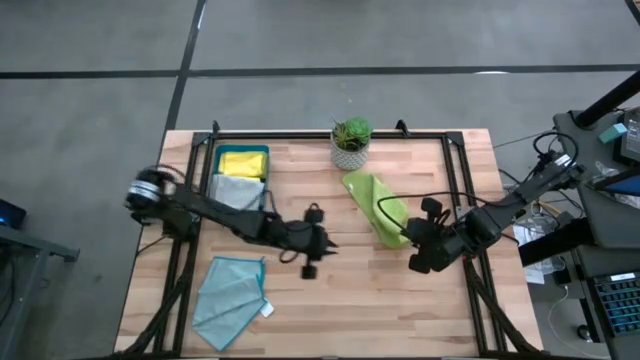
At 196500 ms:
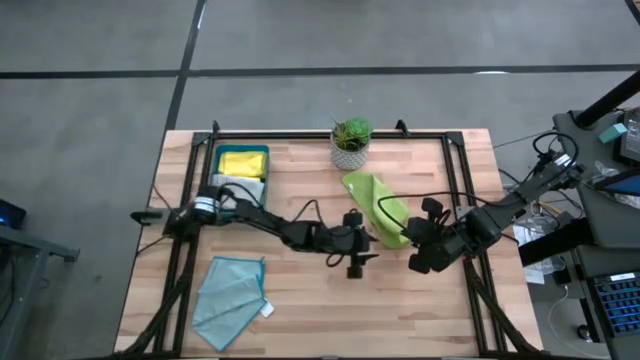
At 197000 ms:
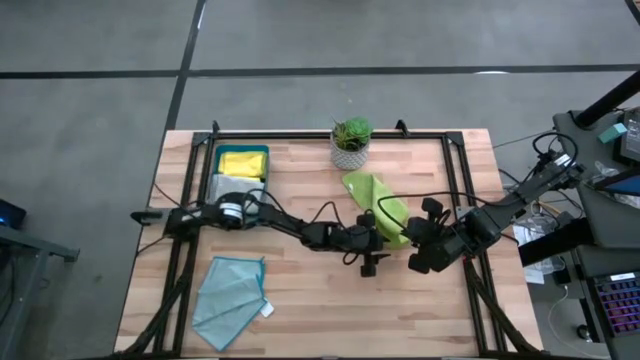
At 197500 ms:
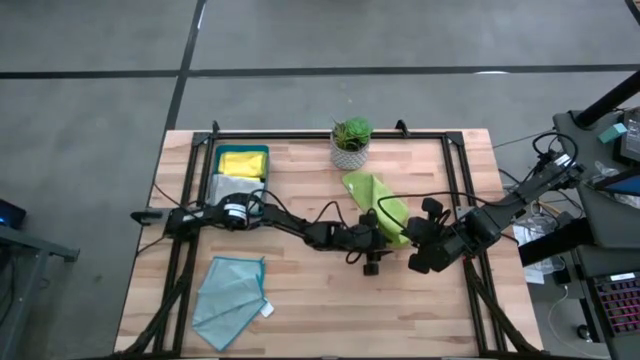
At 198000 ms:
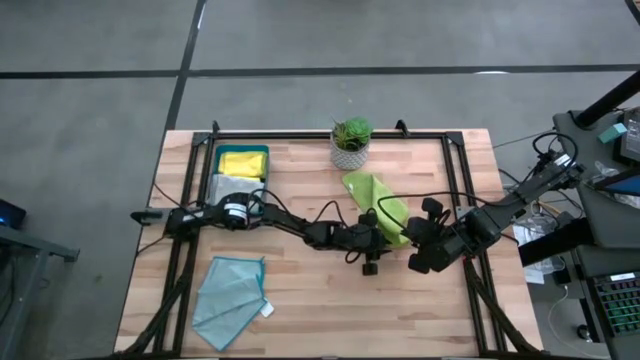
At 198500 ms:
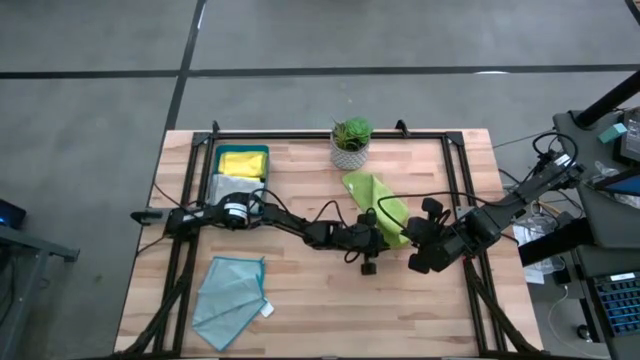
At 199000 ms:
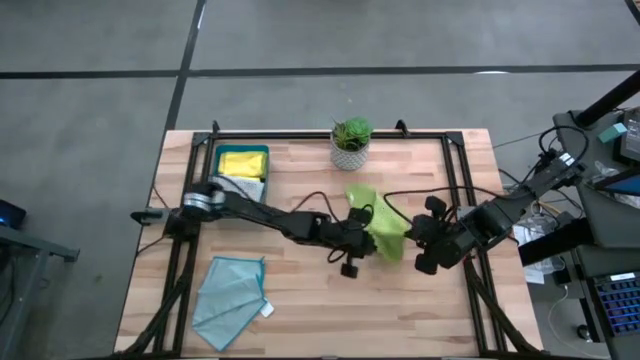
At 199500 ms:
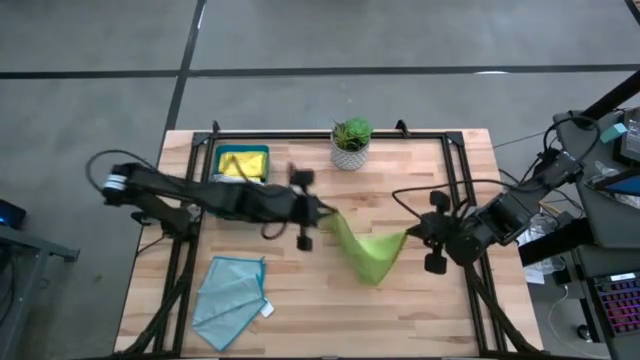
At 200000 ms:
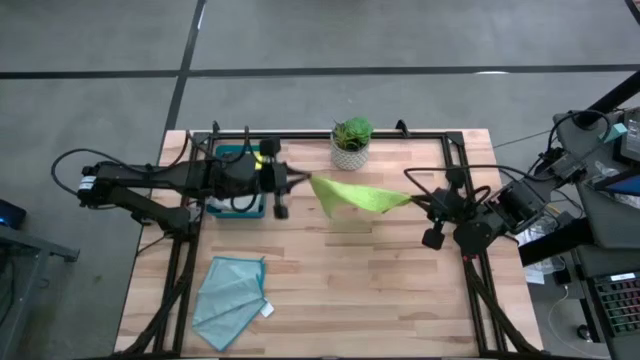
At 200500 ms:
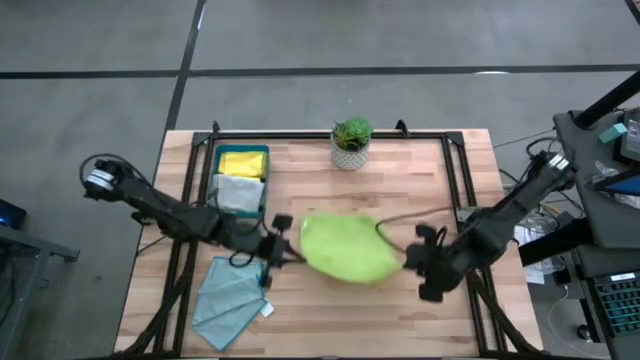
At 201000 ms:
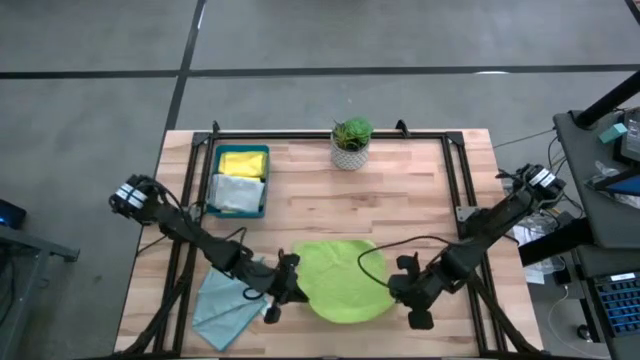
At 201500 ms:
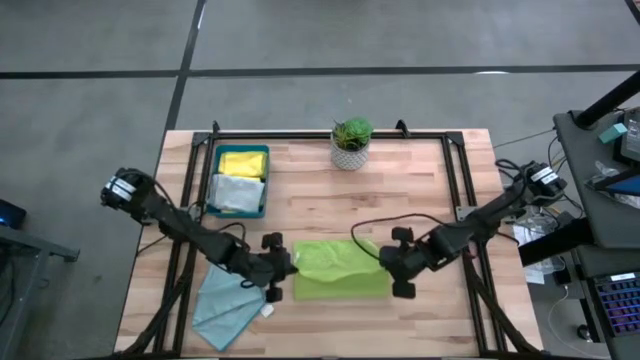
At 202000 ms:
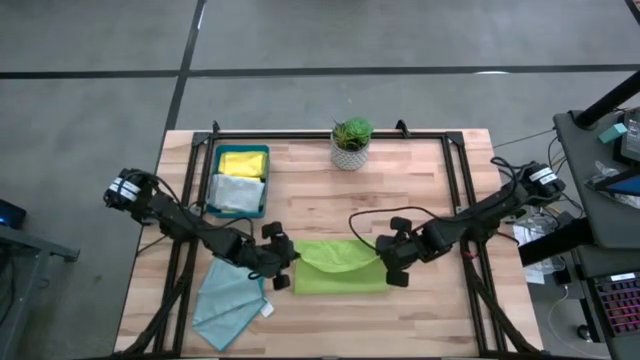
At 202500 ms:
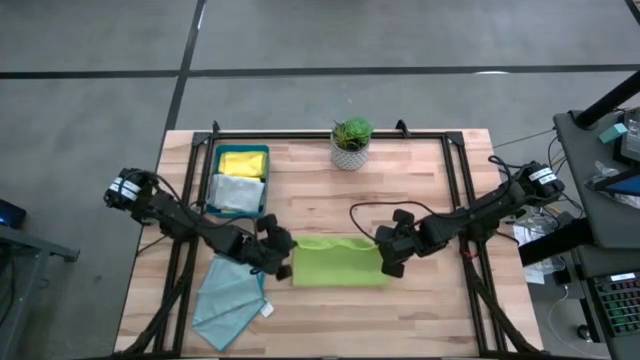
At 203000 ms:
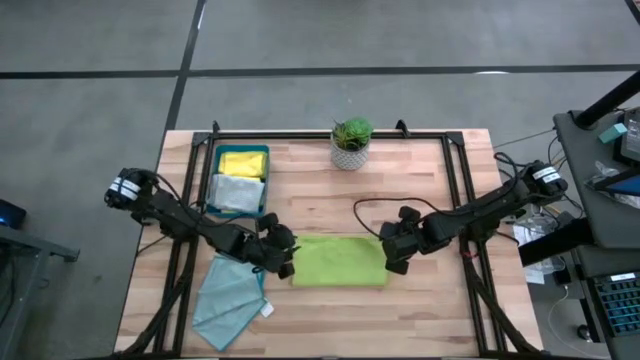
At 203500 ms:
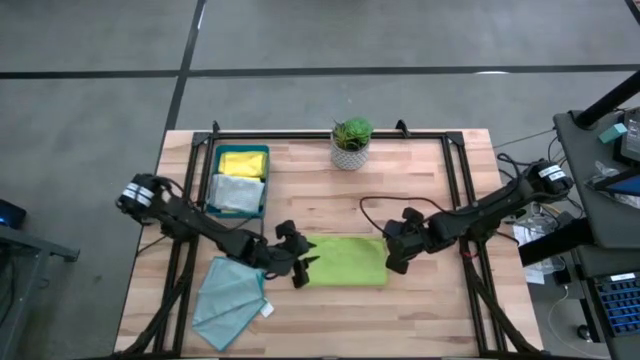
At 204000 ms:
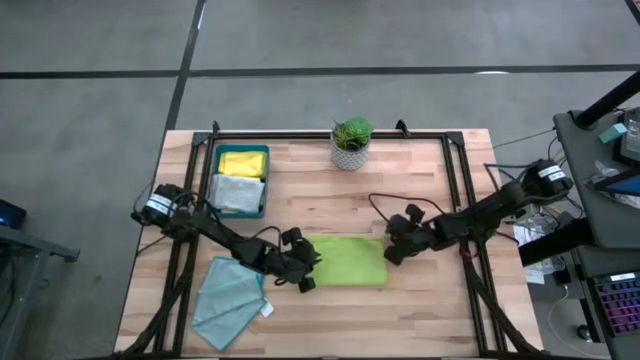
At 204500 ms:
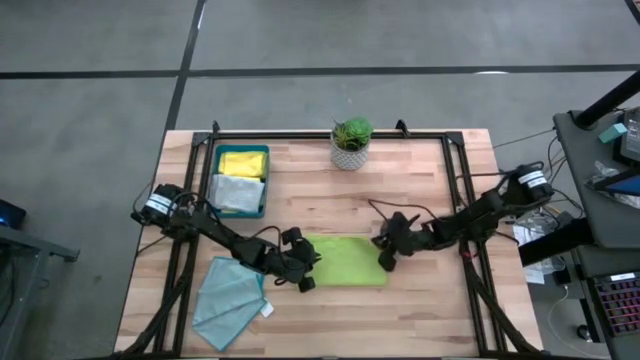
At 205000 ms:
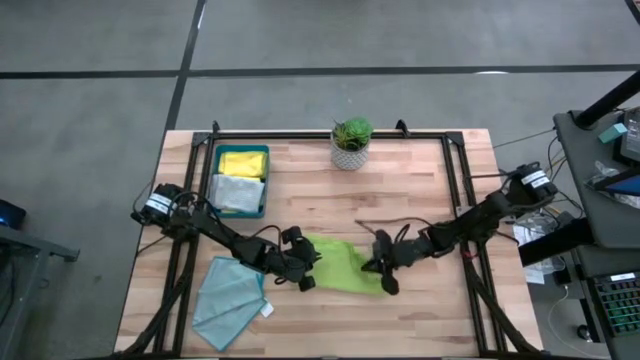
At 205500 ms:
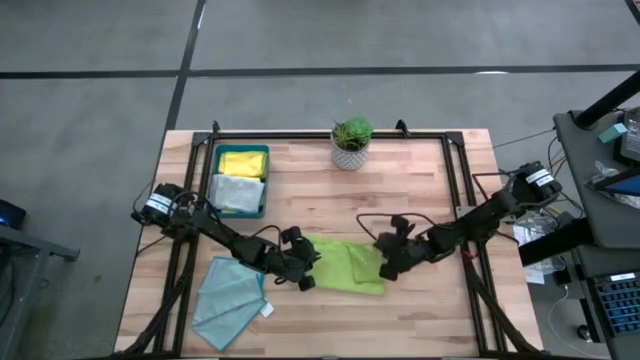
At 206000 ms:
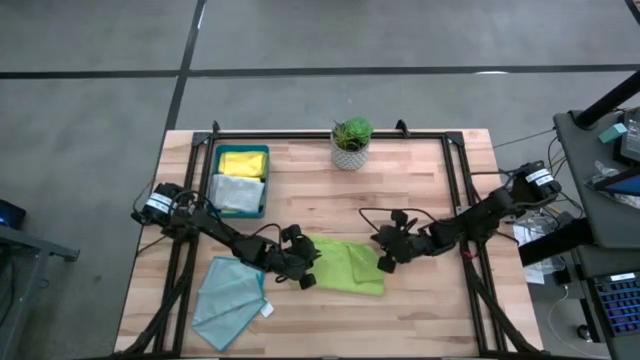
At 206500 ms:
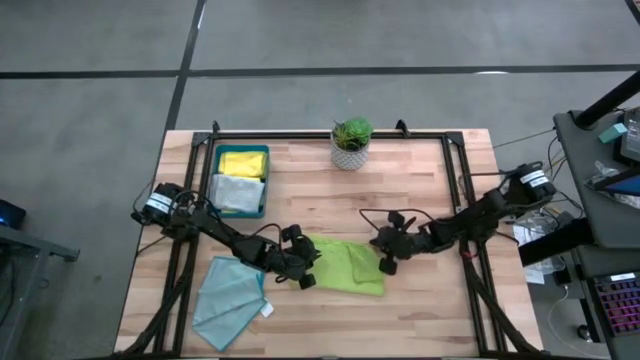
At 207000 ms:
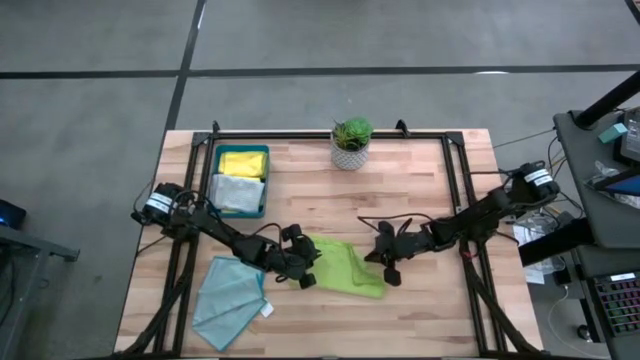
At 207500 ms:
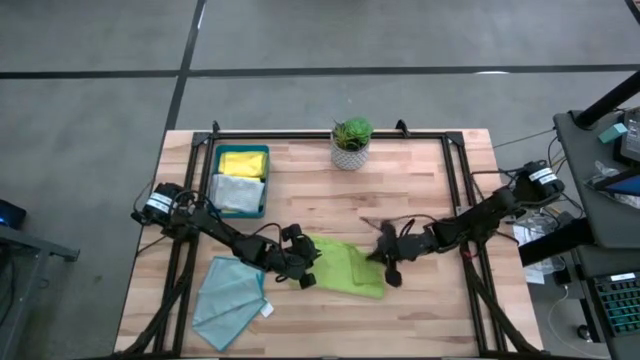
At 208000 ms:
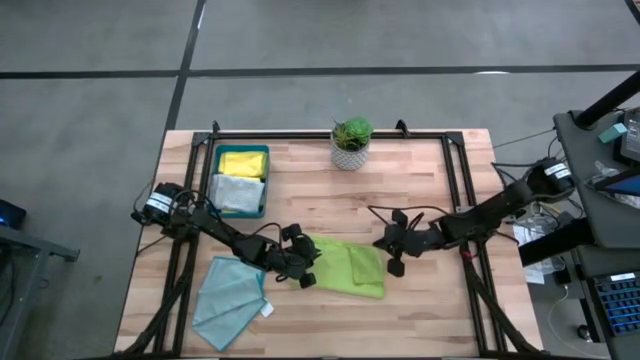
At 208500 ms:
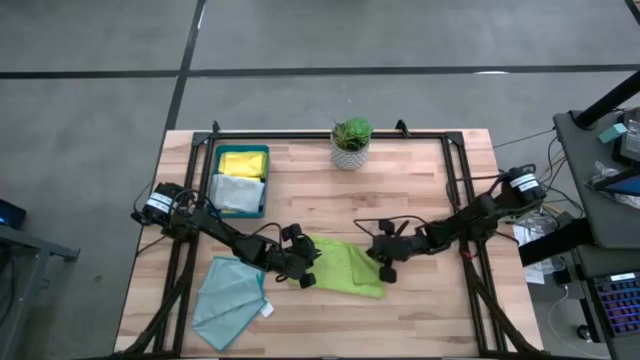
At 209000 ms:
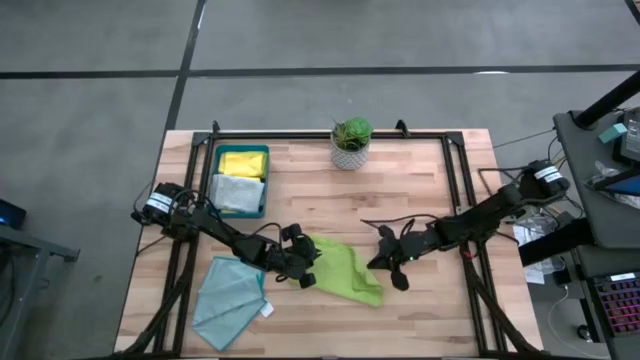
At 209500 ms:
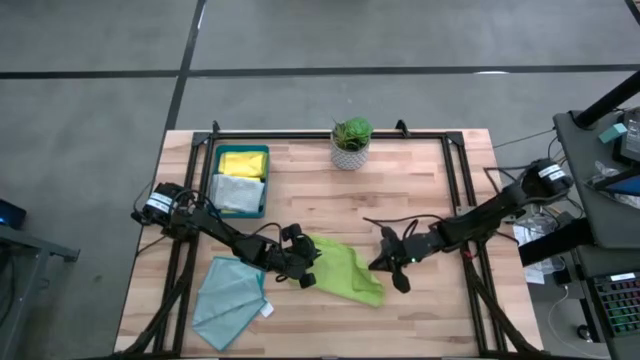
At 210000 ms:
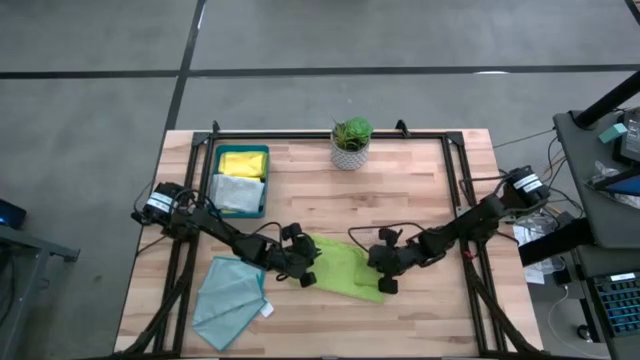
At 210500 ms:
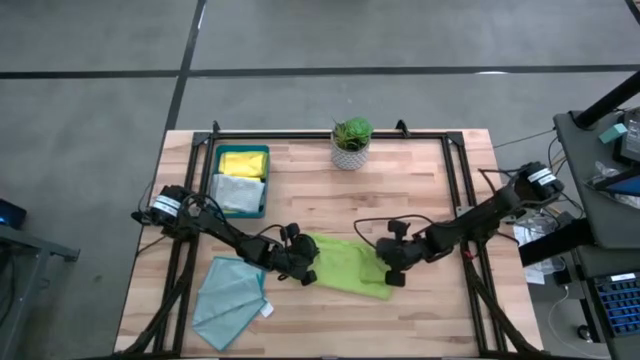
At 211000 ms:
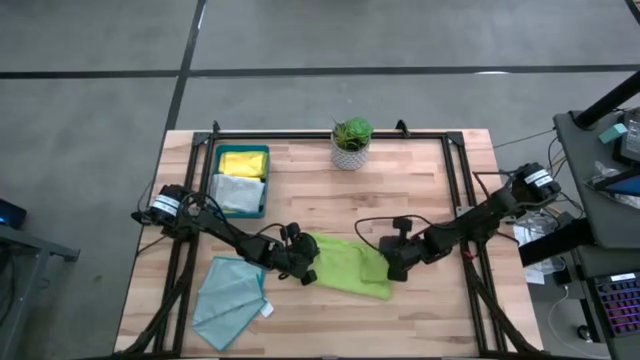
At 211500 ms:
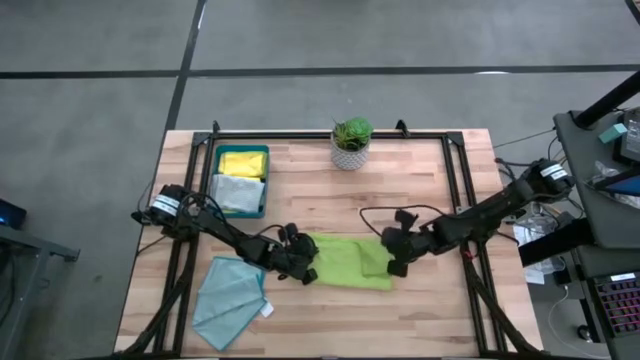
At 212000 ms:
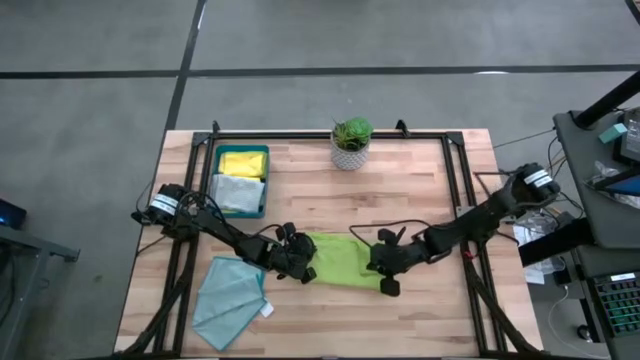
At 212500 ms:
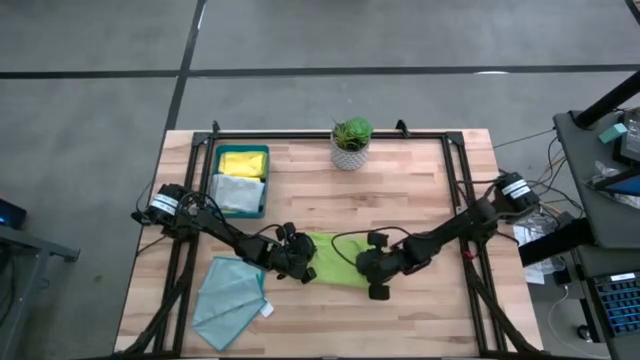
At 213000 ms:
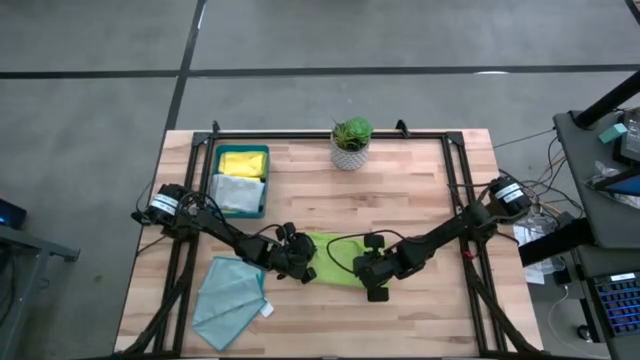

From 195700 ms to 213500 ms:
Task: Fold microfiber towels
Fold the green towel

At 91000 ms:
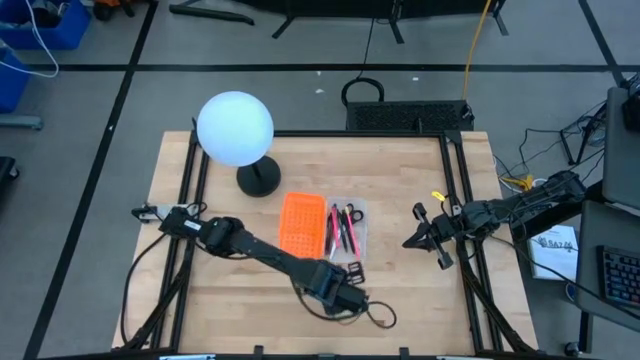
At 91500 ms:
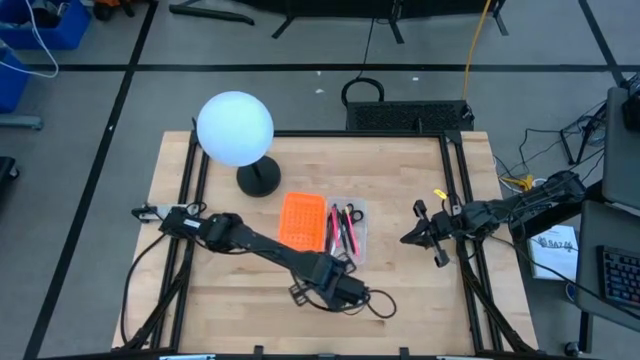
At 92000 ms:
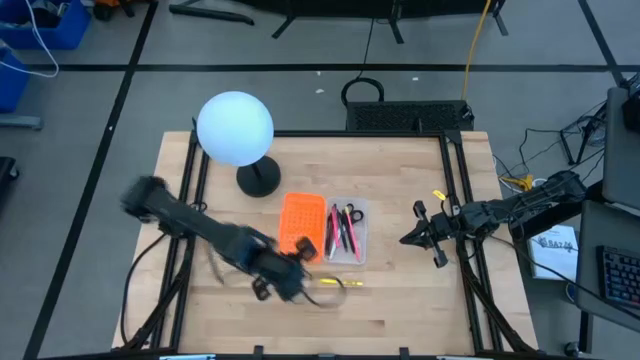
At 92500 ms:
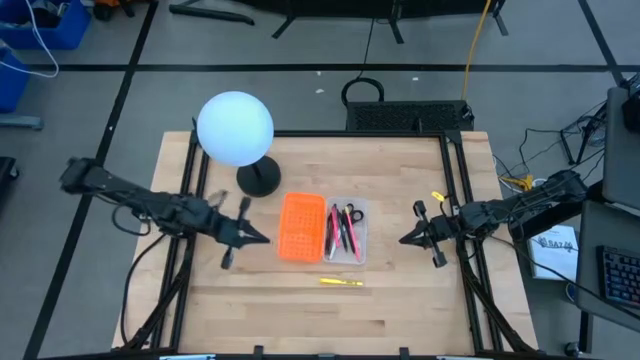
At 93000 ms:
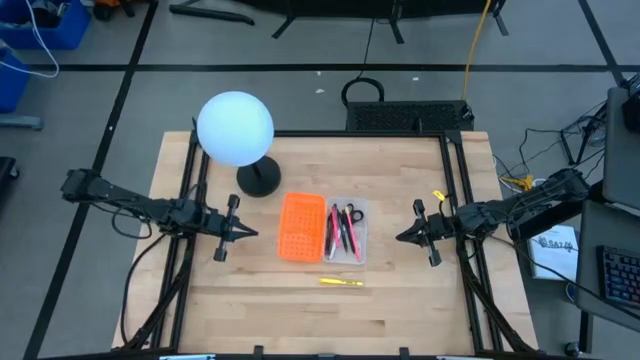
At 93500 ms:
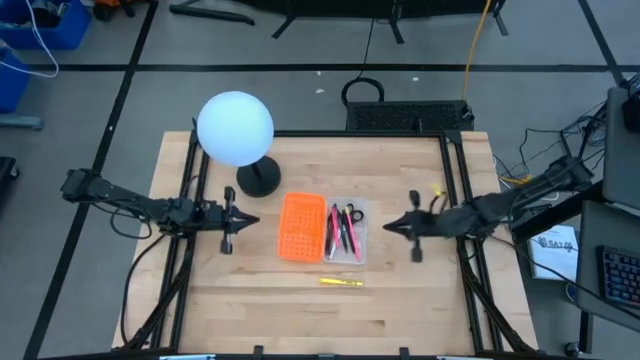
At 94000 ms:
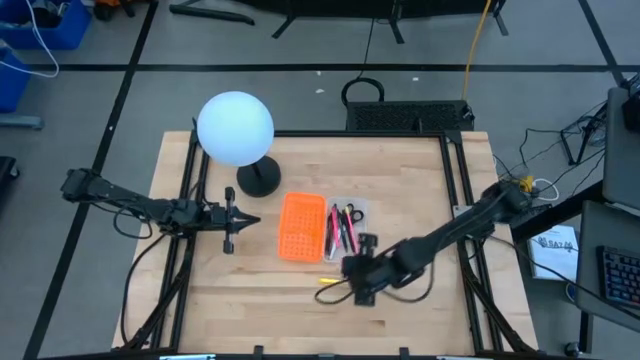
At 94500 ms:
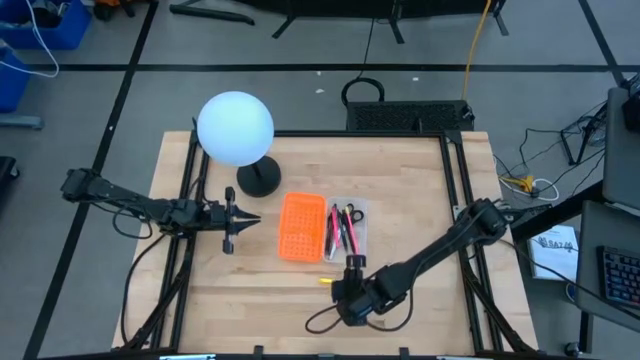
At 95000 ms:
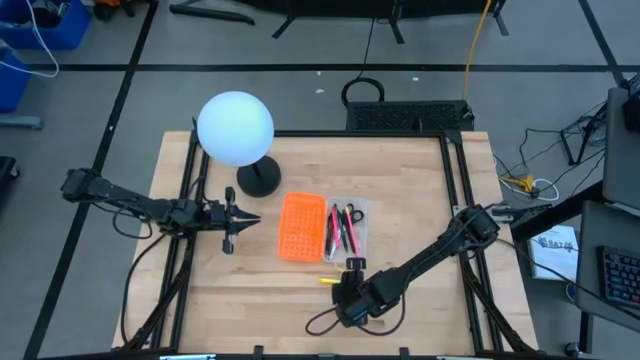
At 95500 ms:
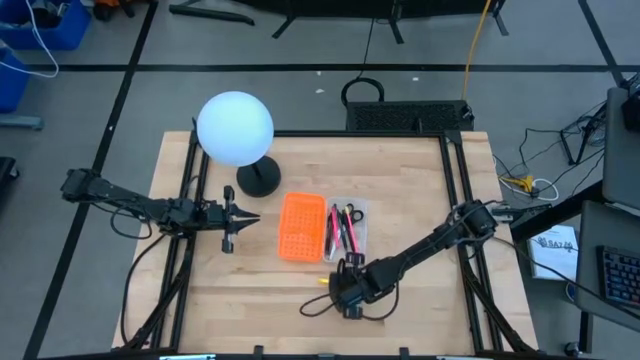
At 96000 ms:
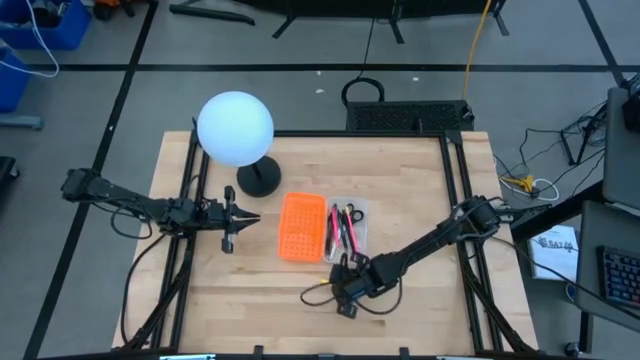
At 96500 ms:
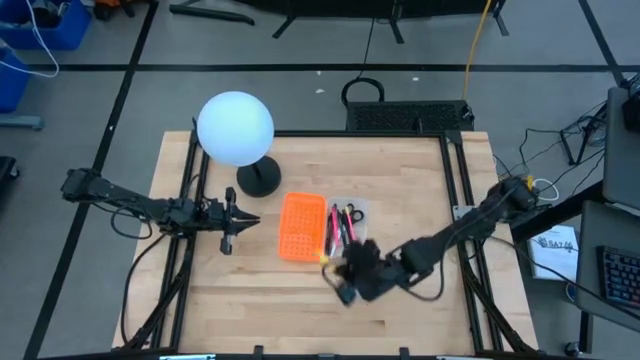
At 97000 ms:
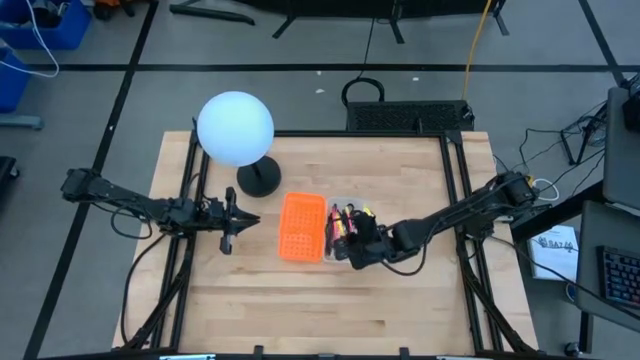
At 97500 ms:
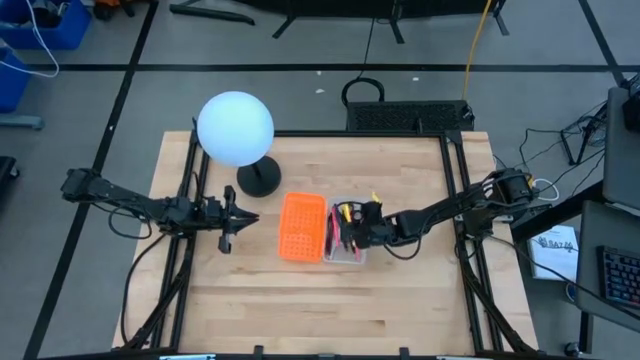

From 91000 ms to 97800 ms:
Task: Pick & place school supplies into a supply box
Put the yellow pen into the orange supply box
